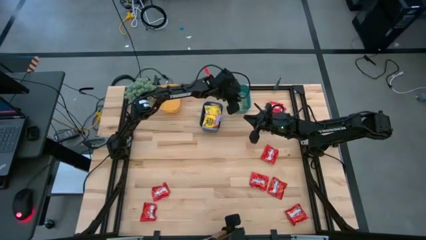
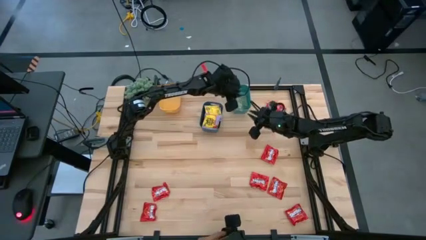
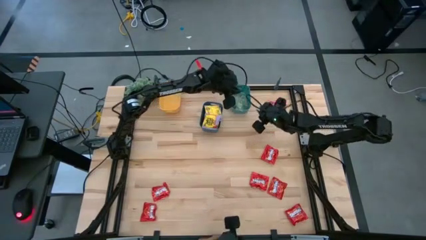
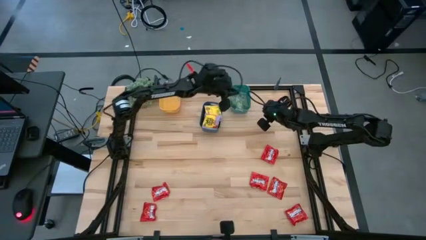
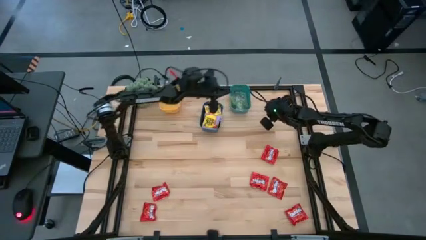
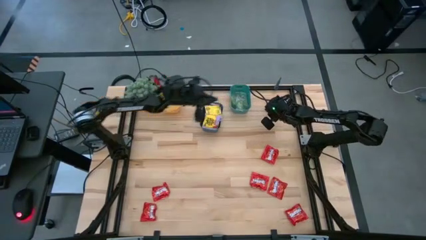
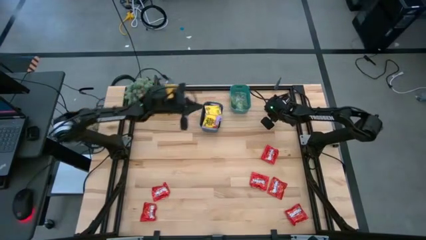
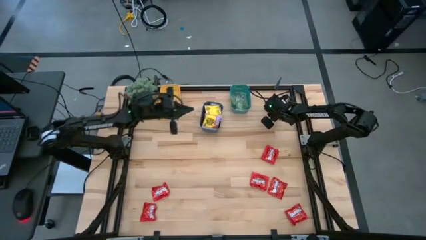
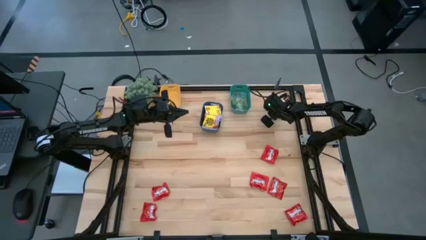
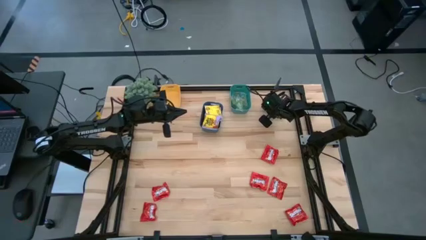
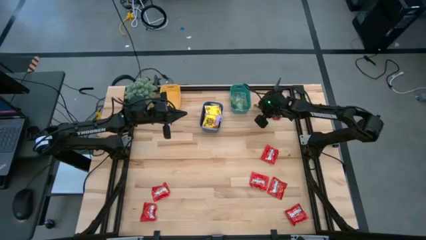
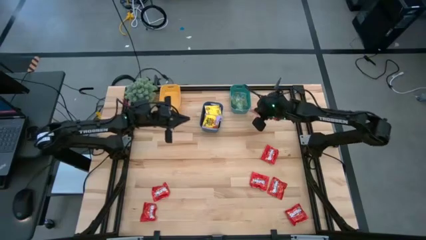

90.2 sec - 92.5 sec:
Task: Sort candy
Put the red candy pack into the yellow bin

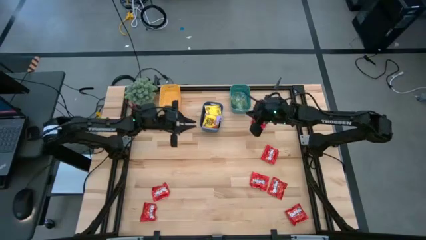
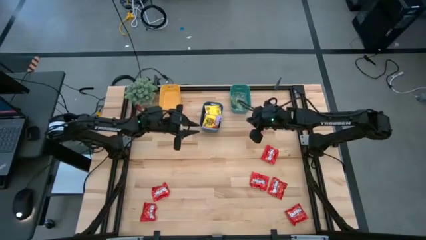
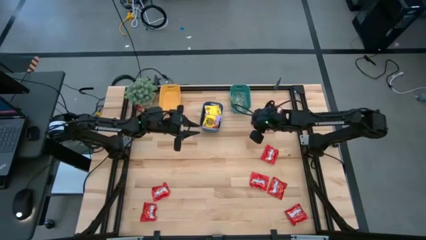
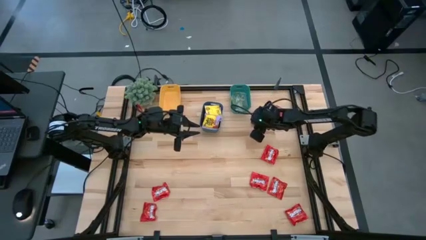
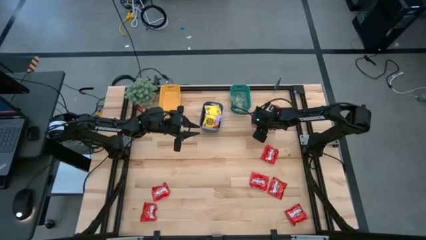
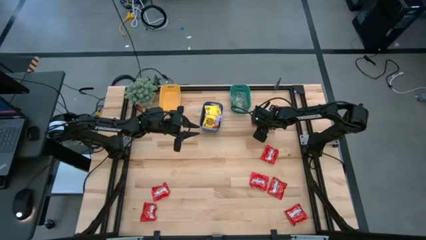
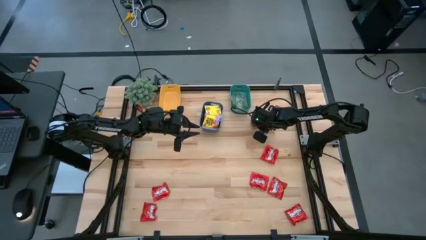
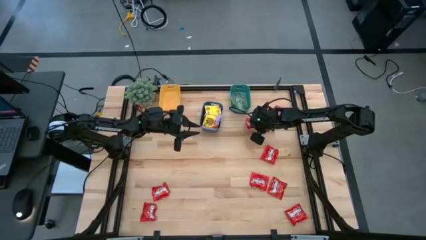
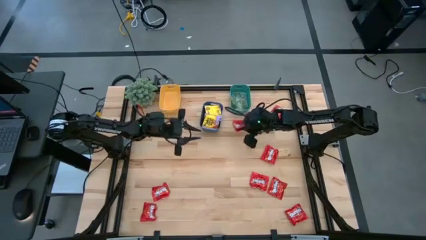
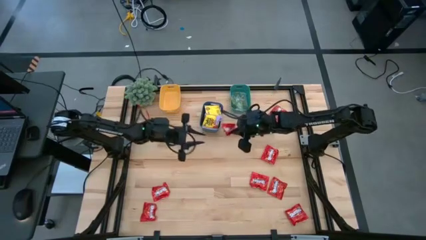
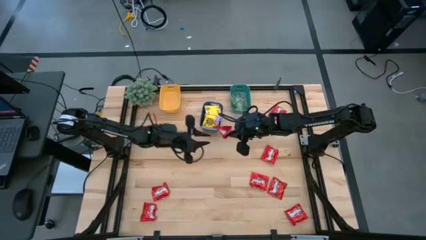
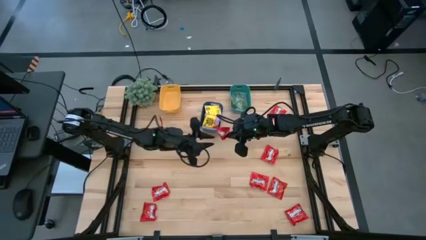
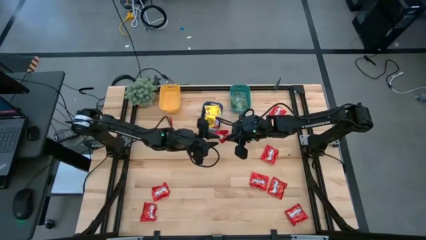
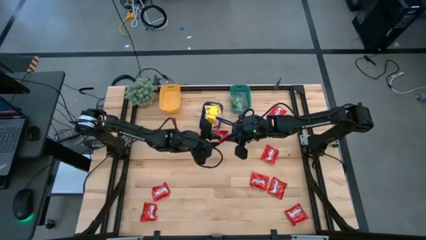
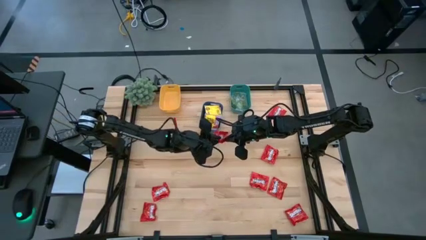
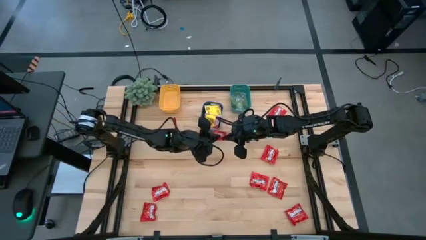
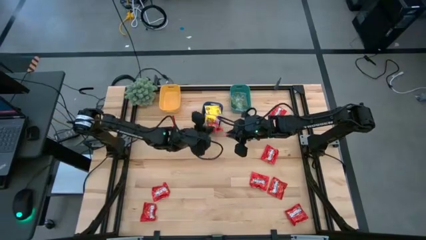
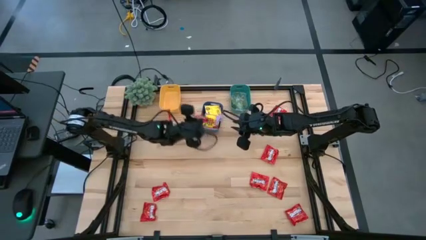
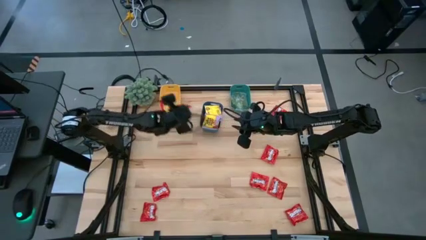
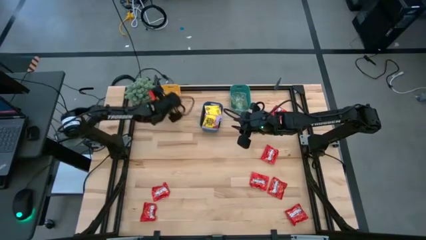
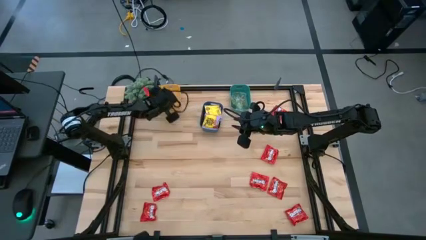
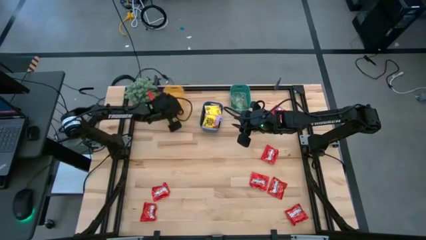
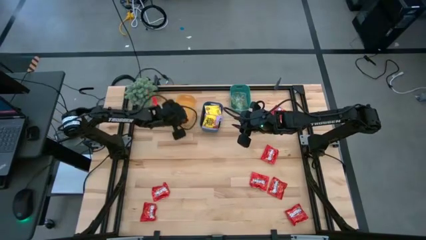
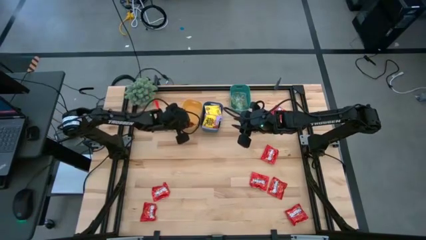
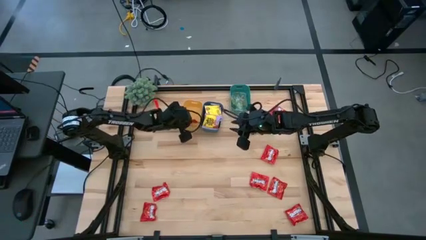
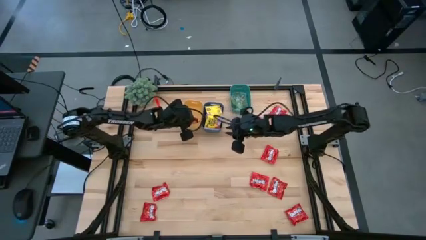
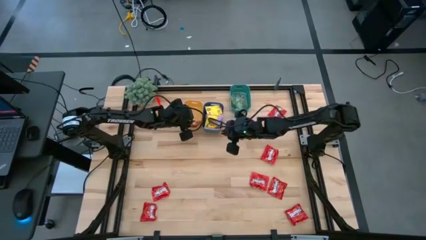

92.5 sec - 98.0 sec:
Put the red candy pack into the yellow bin

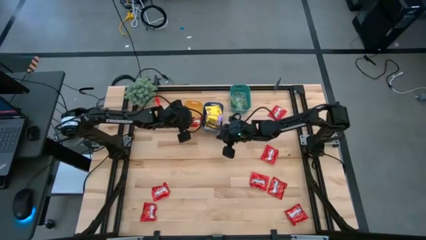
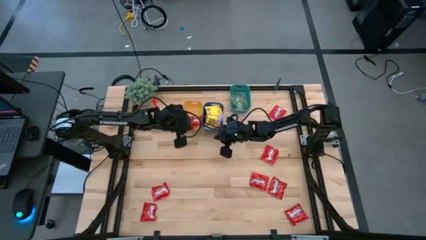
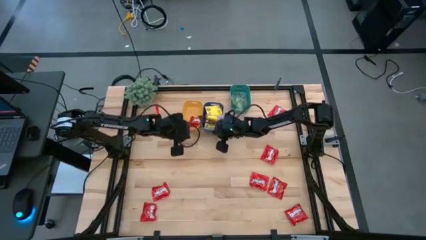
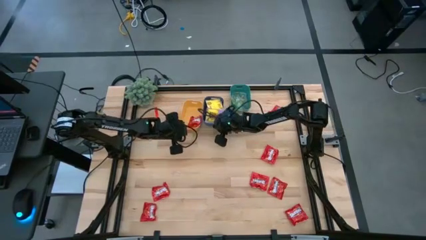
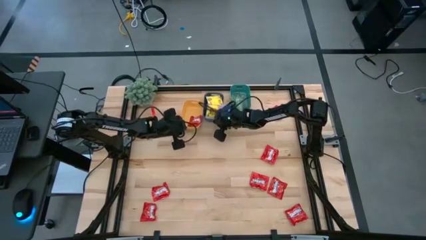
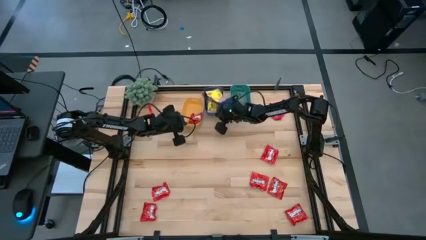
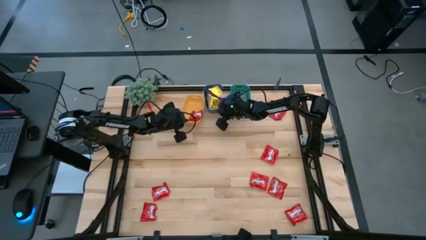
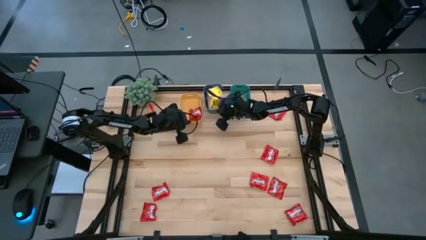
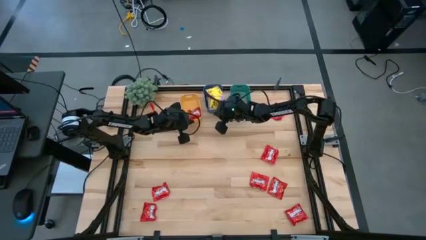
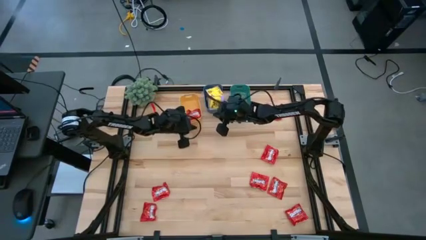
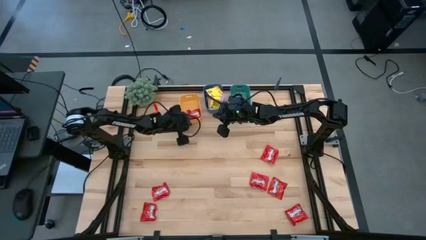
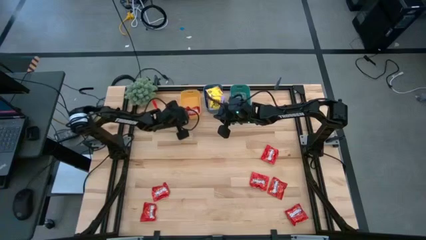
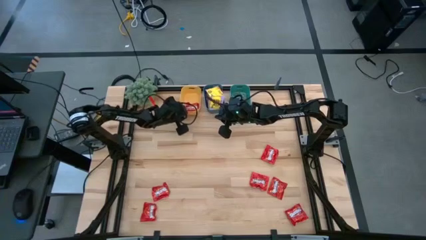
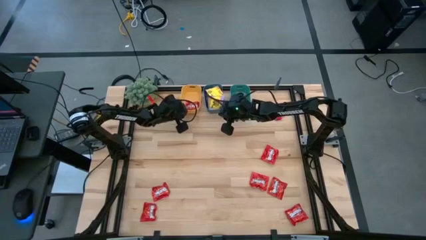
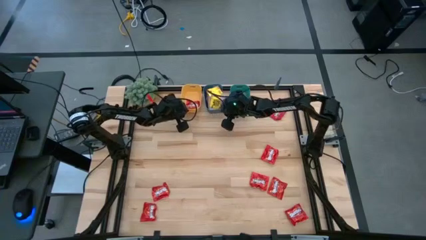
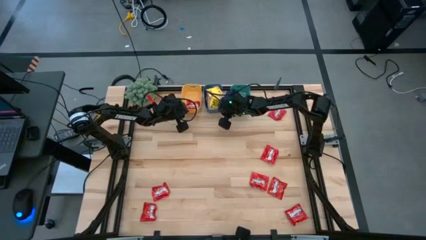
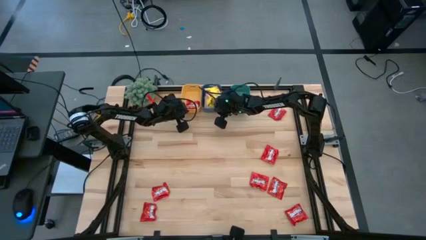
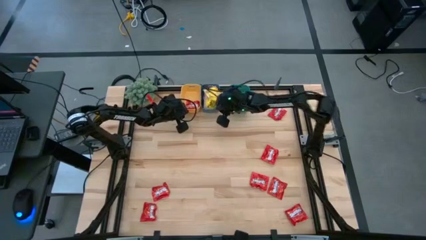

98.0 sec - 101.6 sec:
Adjust the bins

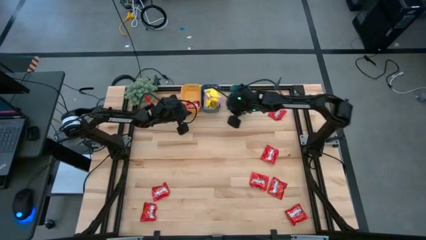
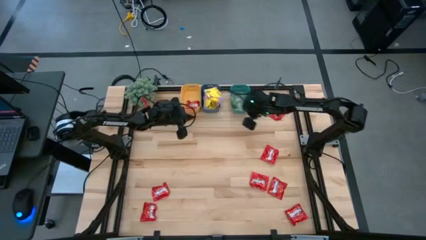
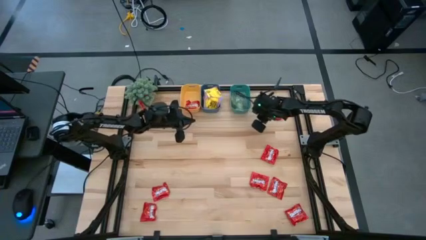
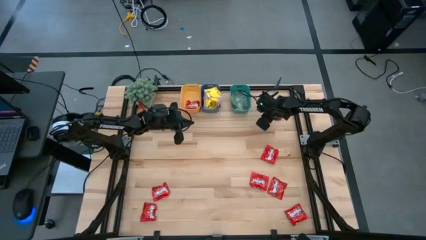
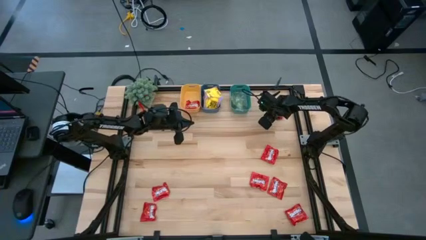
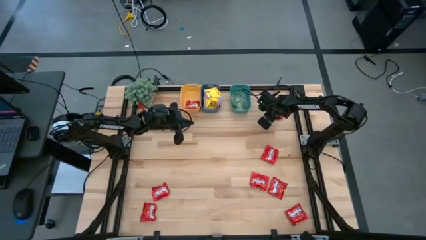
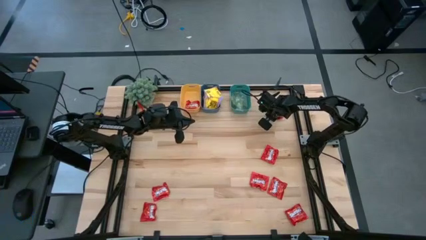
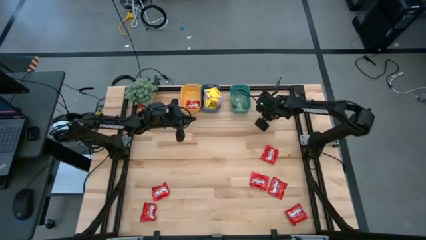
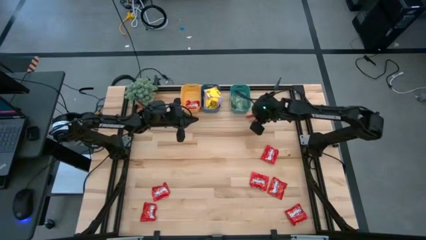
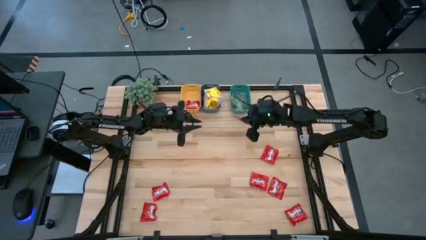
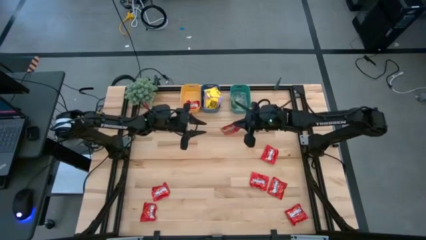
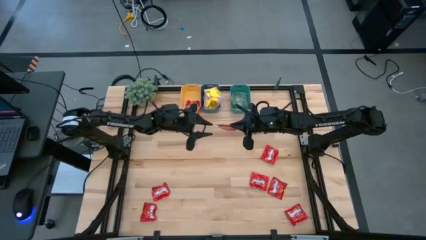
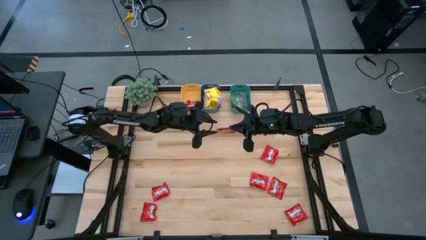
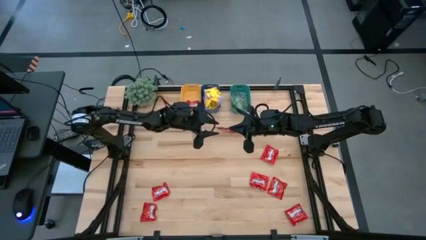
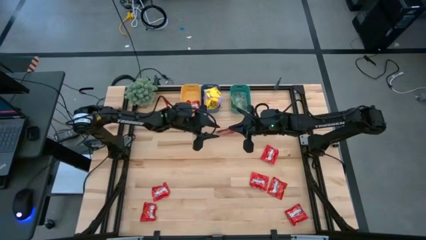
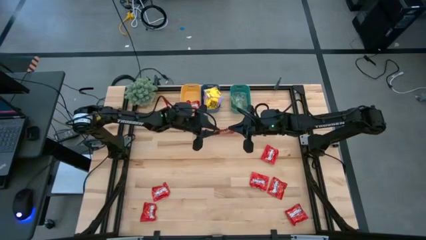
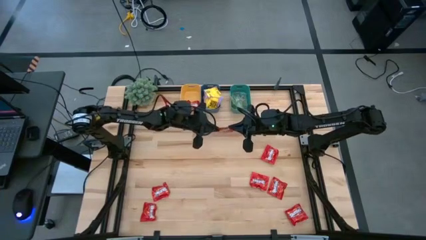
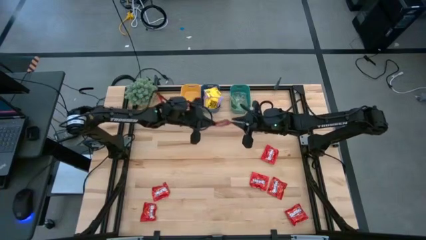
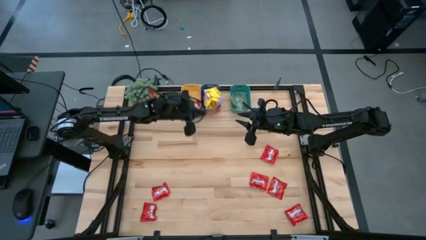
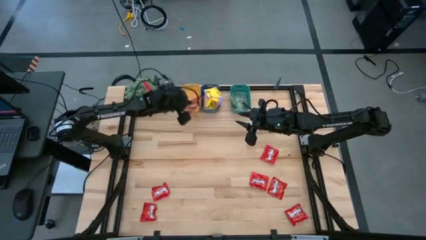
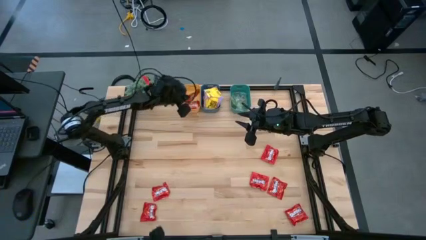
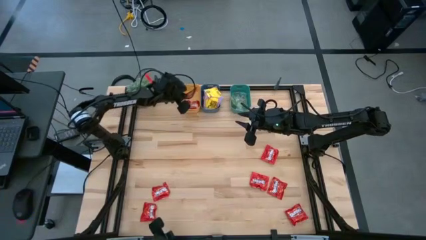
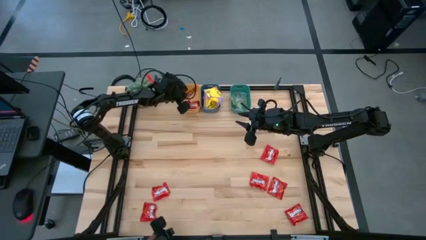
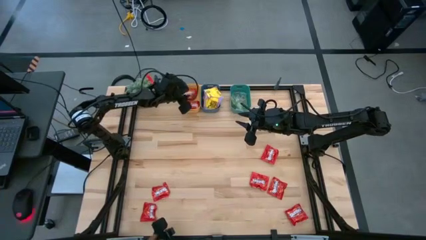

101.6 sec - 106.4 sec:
Put the red candy pack into the yellow bin
